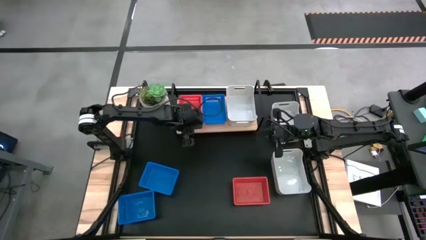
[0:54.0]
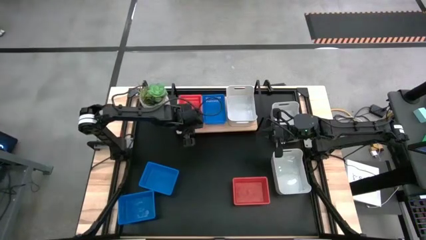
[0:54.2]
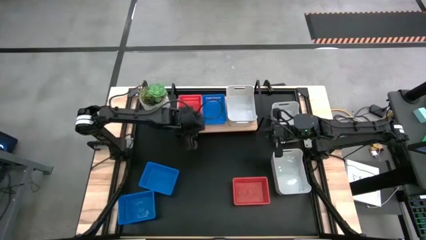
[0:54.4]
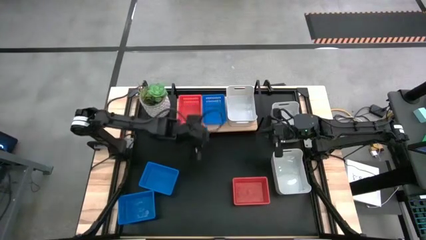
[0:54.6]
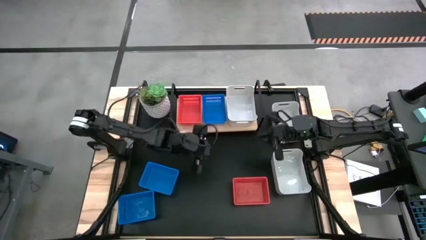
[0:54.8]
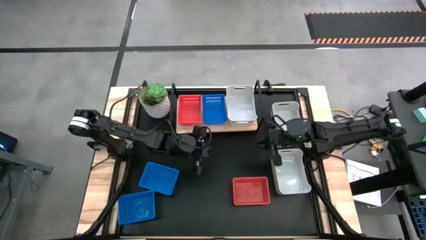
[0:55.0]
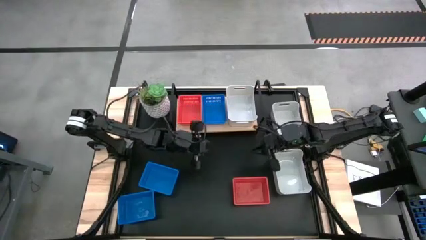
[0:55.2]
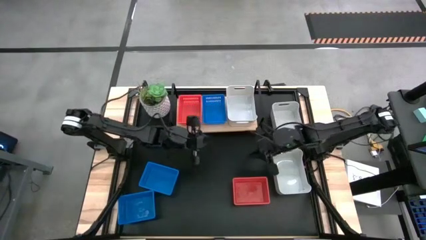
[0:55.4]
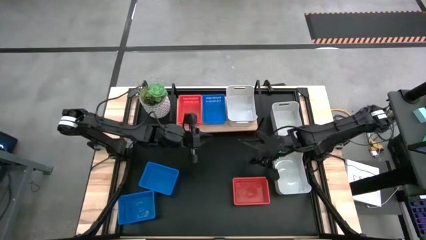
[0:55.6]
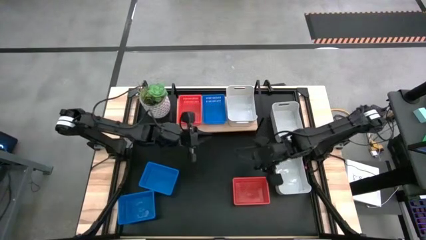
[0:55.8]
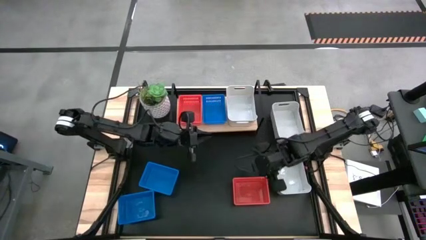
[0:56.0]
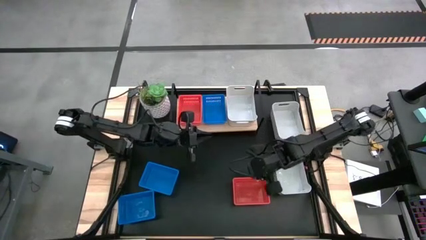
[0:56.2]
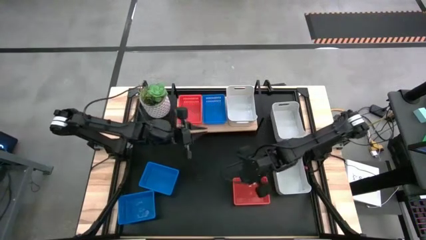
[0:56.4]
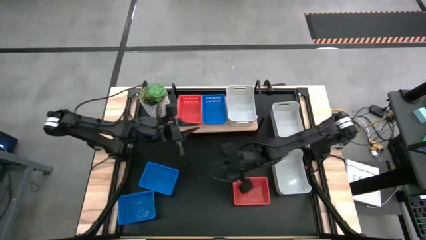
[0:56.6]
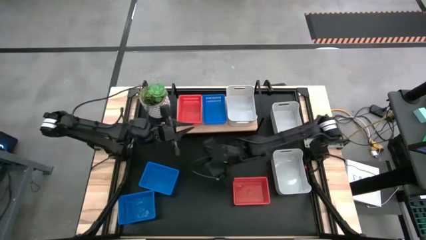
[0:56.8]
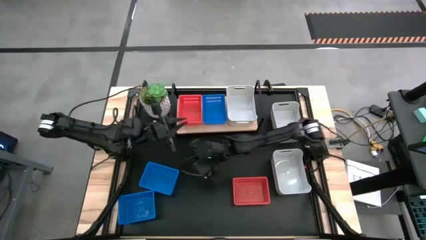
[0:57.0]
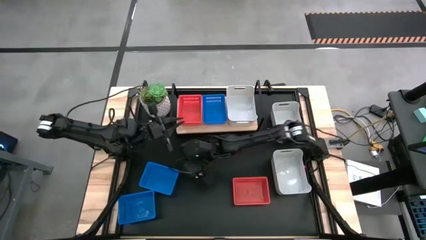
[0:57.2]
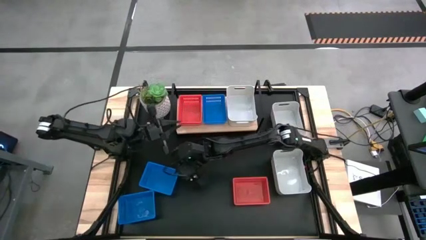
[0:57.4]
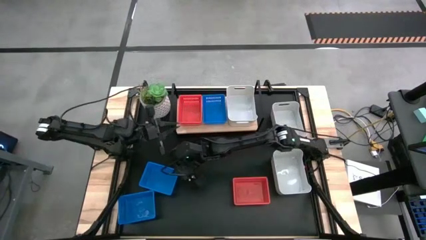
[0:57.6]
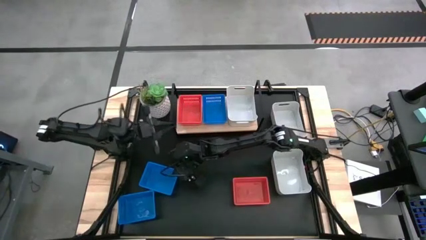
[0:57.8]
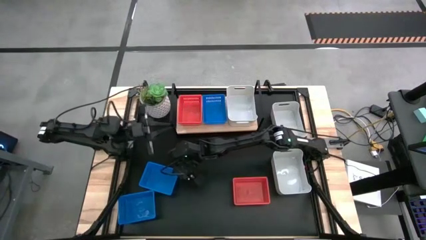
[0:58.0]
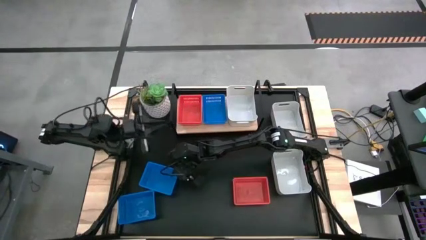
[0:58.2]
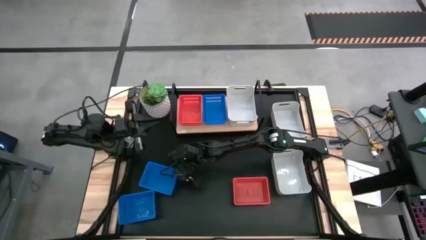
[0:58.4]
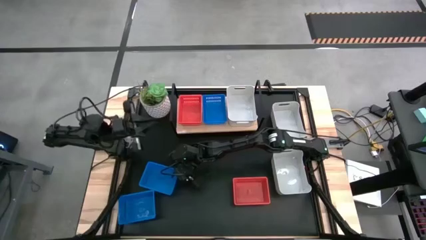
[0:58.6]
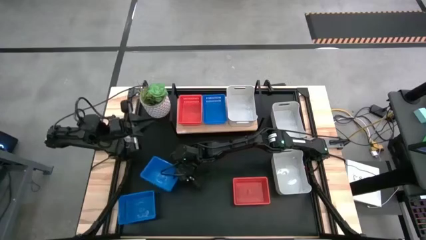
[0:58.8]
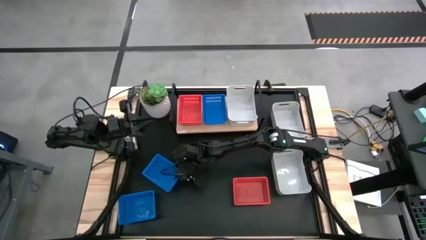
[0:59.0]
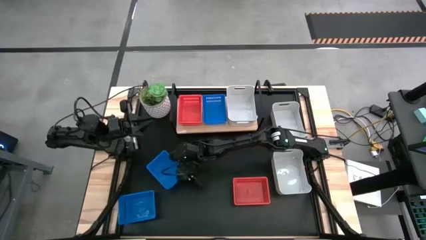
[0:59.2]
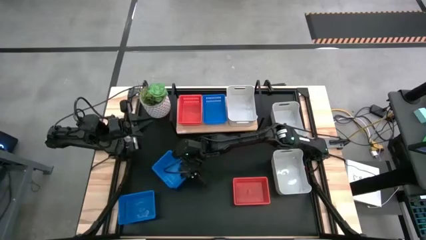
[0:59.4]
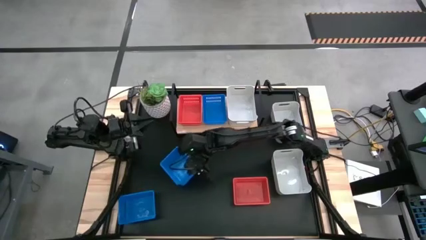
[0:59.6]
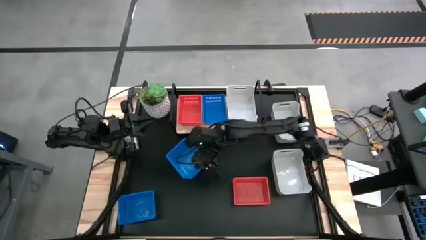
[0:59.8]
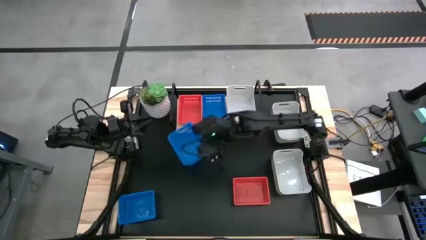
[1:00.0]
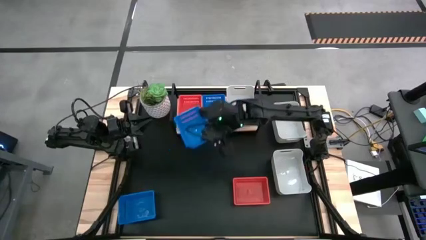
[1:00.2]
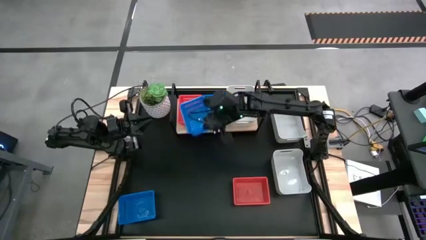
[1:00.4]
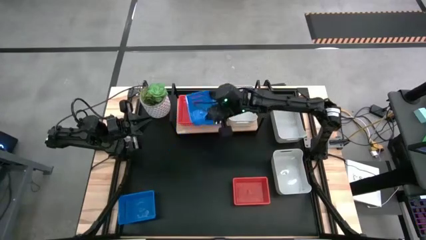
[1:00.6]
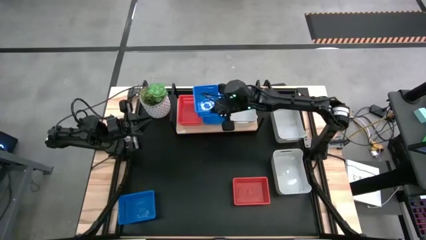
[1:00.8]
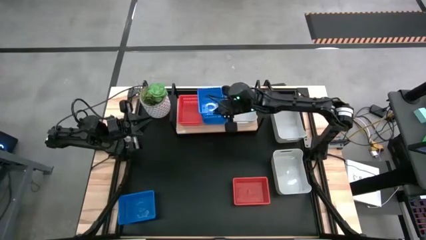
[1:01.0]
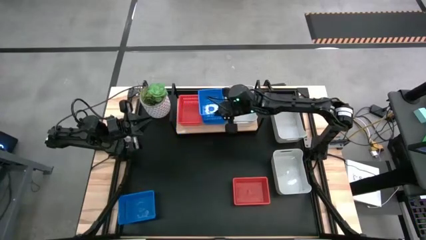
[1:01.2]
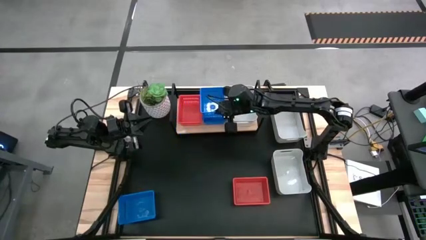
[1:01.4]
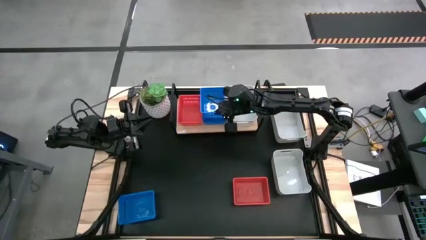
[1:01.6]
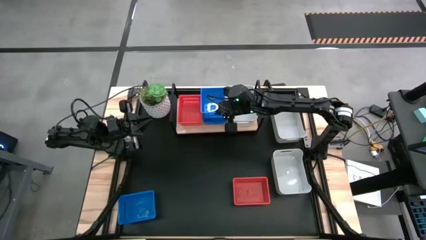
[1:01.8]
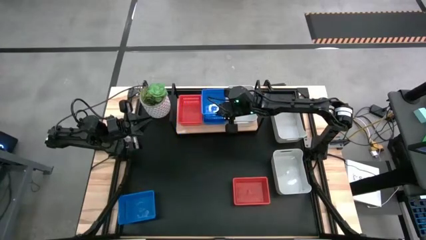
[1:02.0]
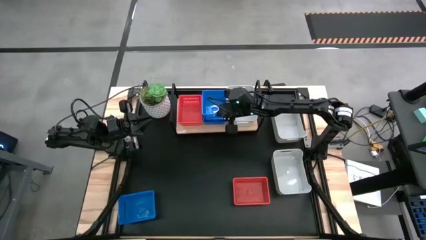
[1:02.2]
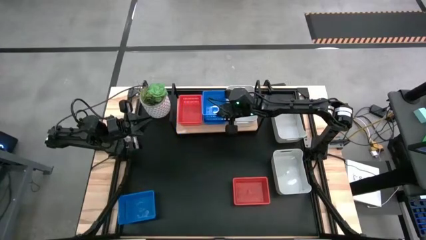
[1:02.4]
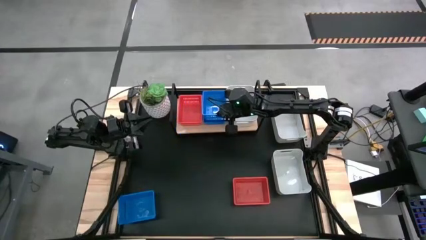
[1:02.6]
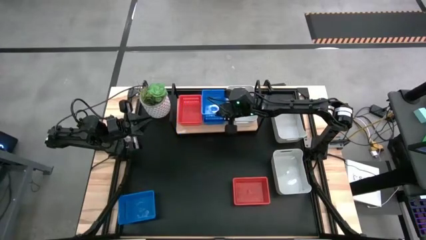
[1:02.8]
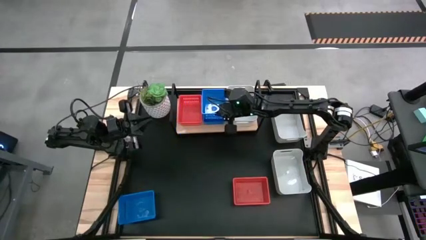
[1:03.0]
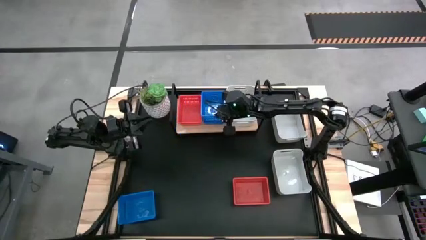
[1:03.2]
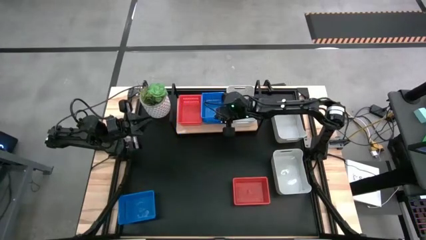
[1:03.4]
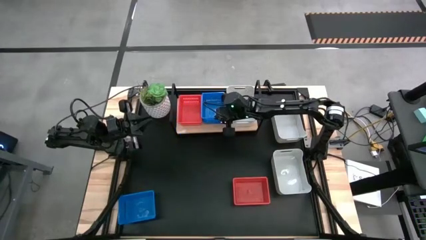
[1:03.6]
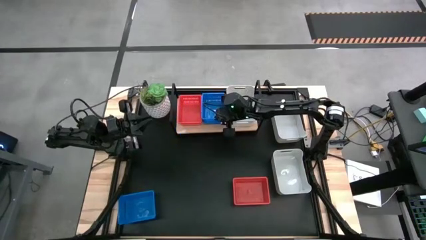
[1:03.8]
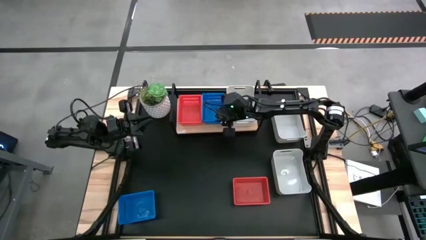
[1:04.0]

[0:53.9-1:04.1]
Stack the top blue basket on top of the blue basket on the shelf
